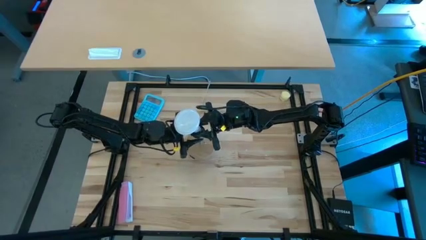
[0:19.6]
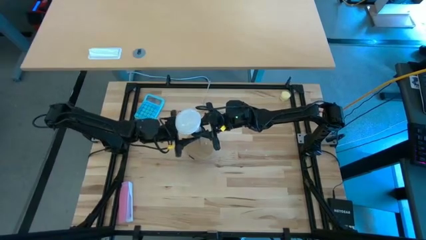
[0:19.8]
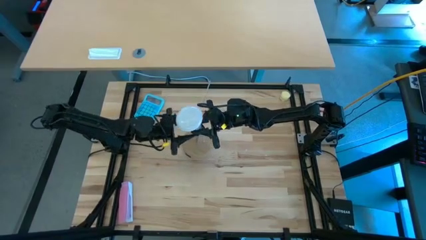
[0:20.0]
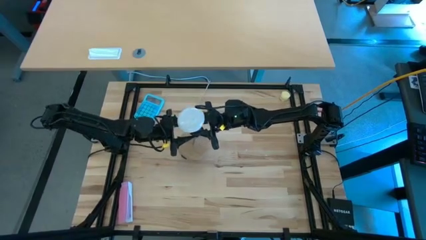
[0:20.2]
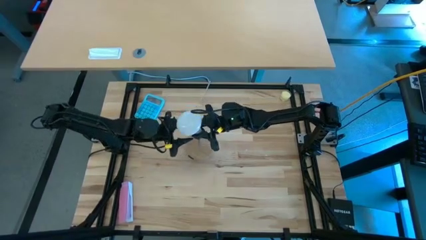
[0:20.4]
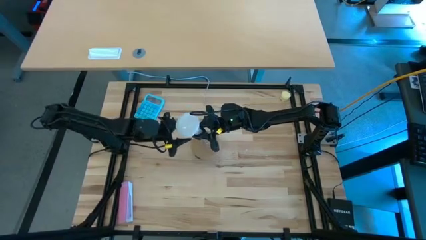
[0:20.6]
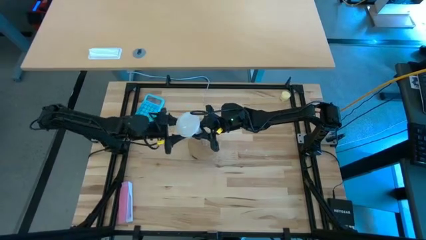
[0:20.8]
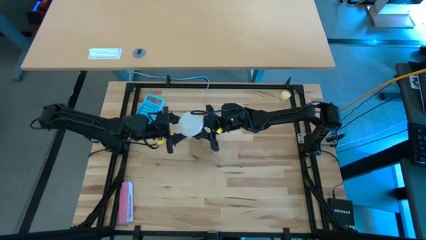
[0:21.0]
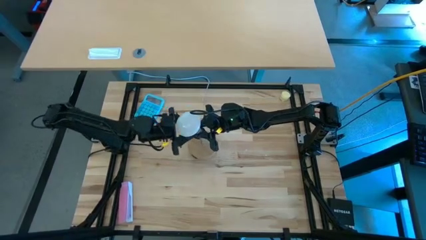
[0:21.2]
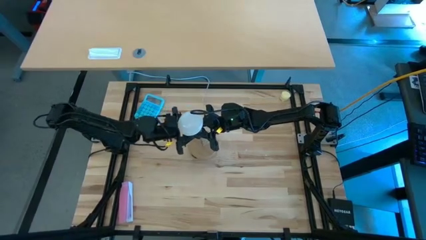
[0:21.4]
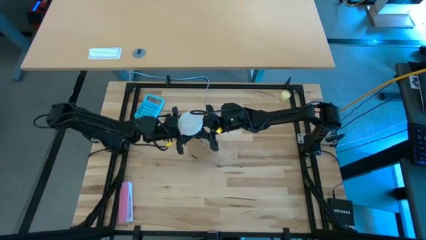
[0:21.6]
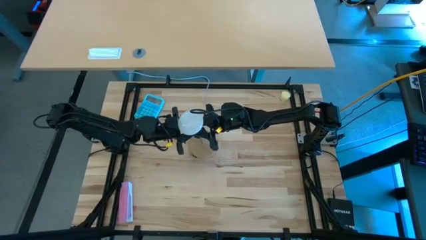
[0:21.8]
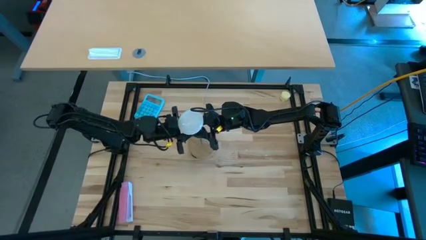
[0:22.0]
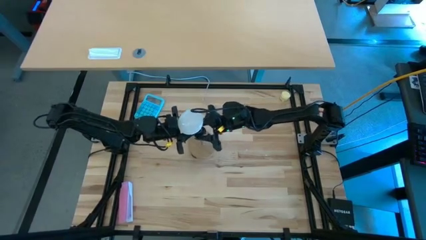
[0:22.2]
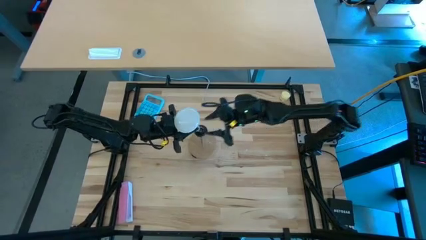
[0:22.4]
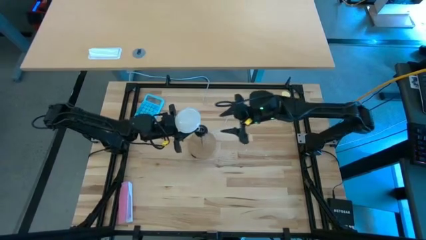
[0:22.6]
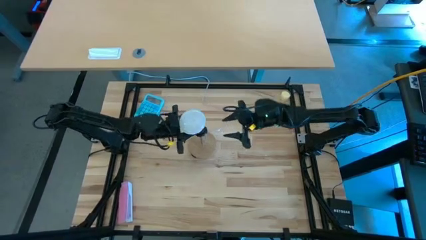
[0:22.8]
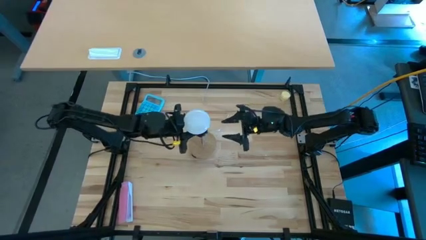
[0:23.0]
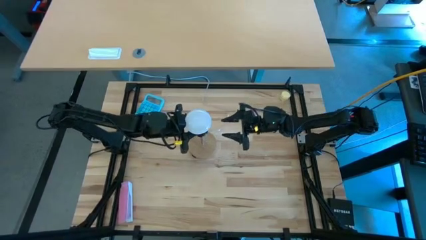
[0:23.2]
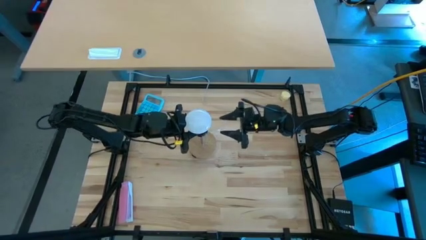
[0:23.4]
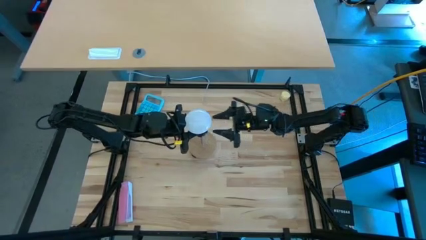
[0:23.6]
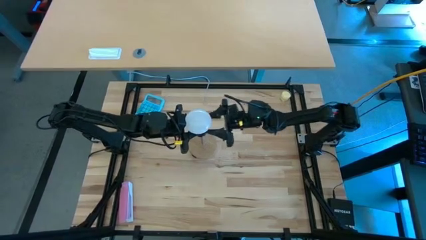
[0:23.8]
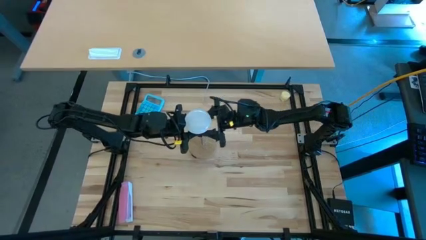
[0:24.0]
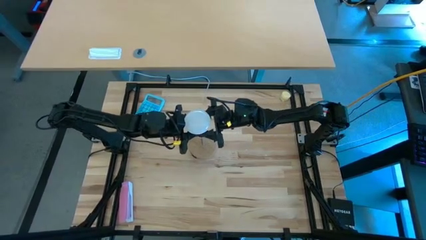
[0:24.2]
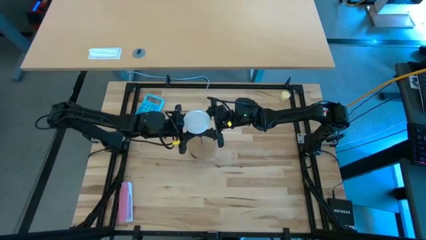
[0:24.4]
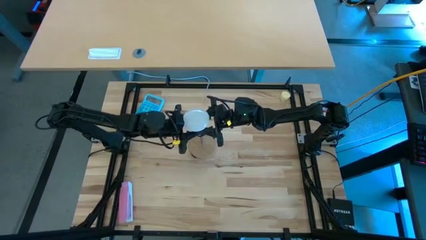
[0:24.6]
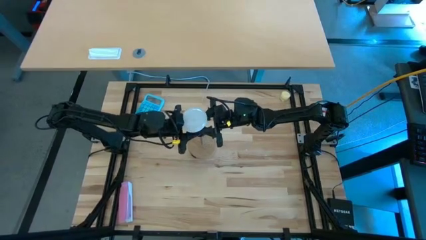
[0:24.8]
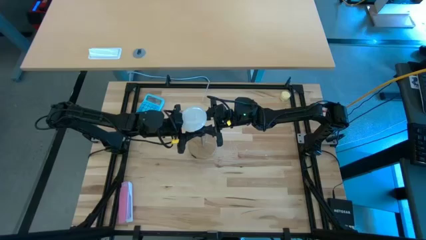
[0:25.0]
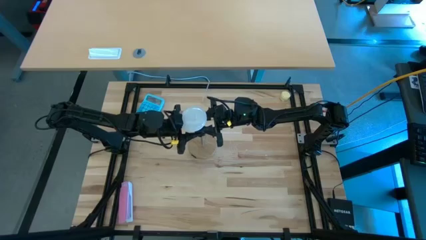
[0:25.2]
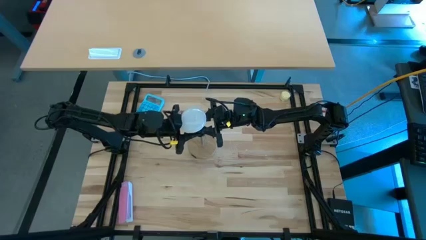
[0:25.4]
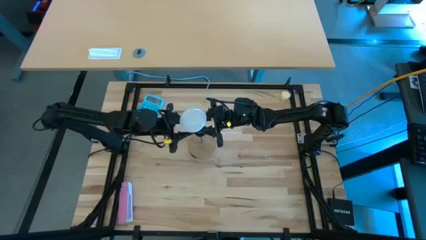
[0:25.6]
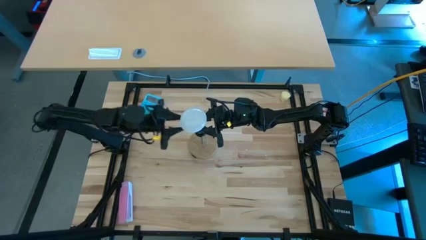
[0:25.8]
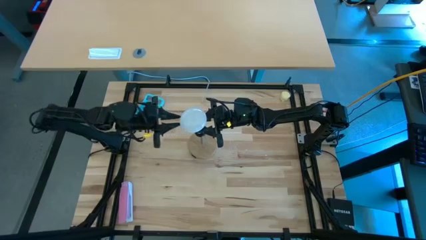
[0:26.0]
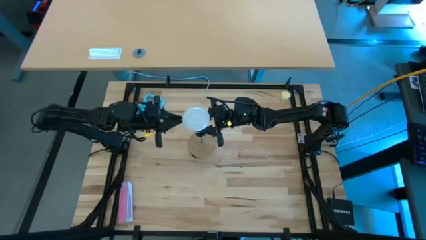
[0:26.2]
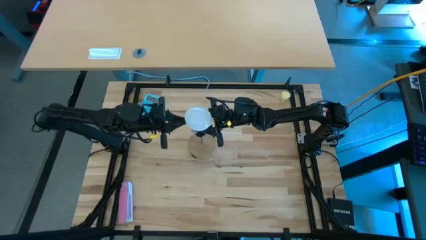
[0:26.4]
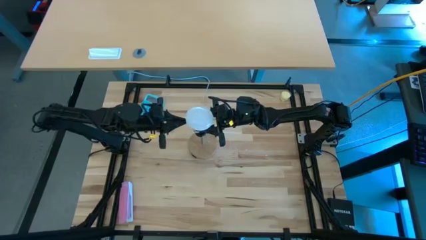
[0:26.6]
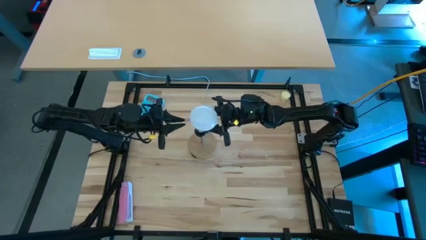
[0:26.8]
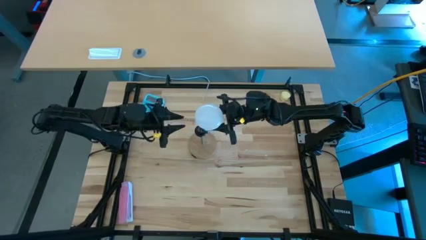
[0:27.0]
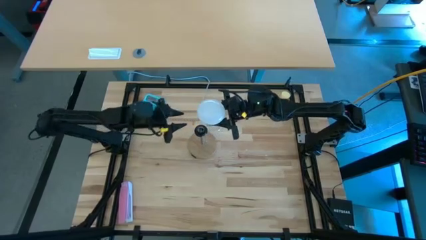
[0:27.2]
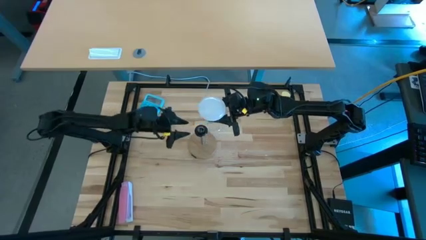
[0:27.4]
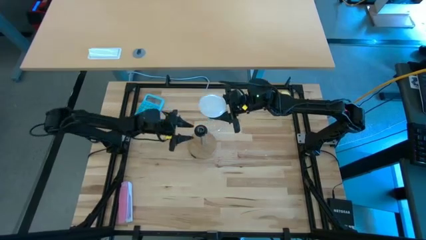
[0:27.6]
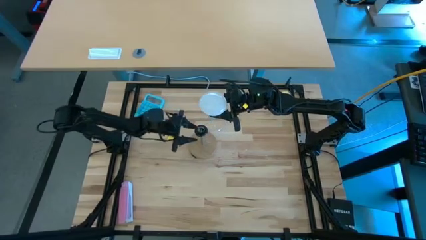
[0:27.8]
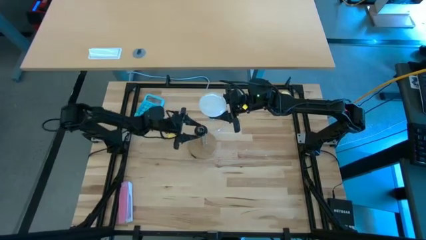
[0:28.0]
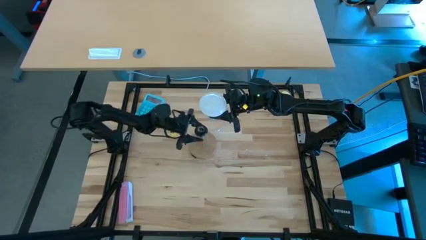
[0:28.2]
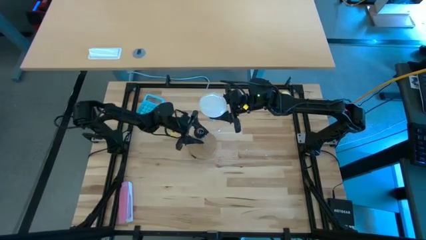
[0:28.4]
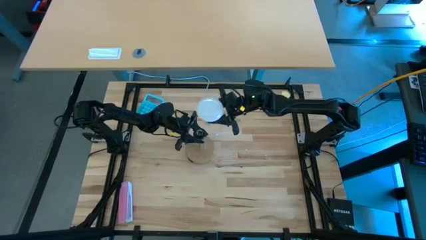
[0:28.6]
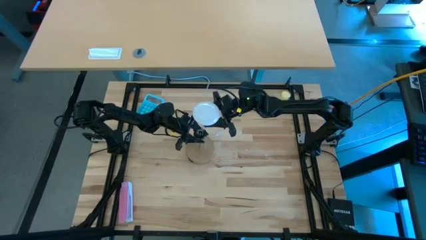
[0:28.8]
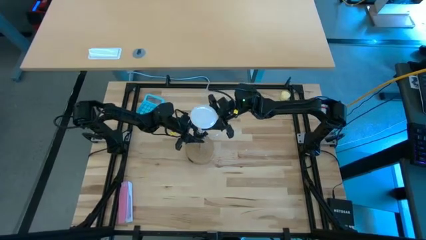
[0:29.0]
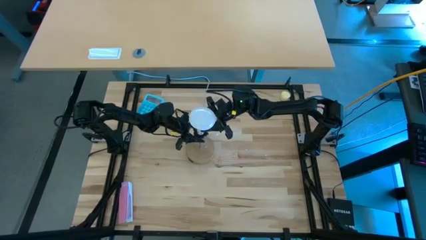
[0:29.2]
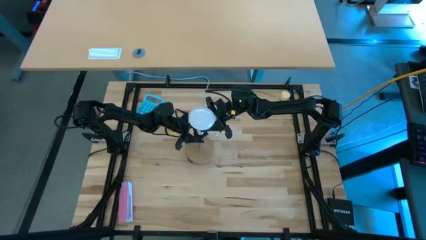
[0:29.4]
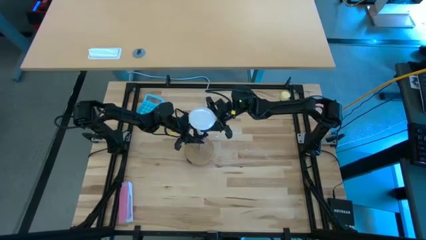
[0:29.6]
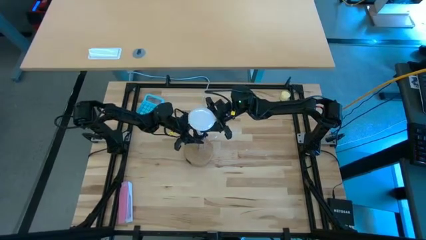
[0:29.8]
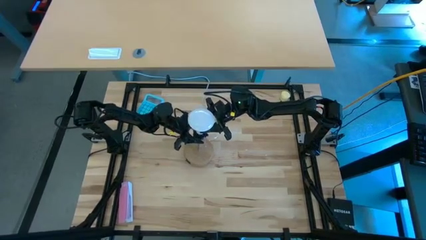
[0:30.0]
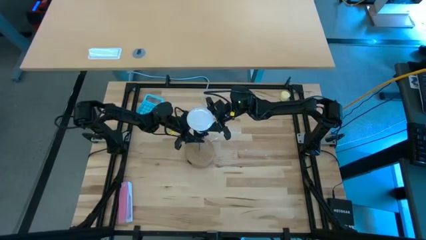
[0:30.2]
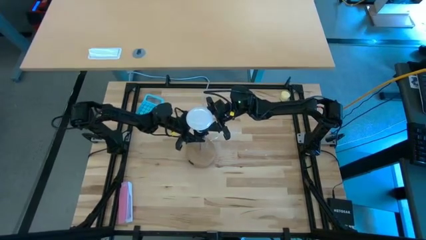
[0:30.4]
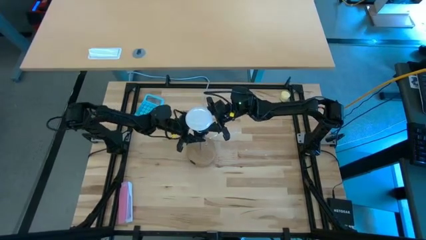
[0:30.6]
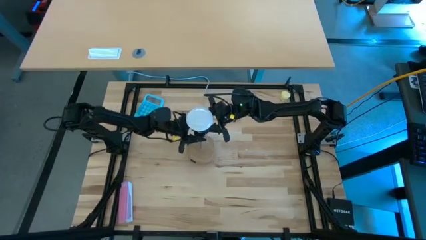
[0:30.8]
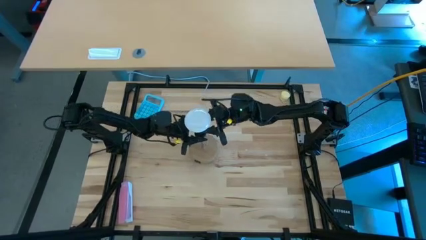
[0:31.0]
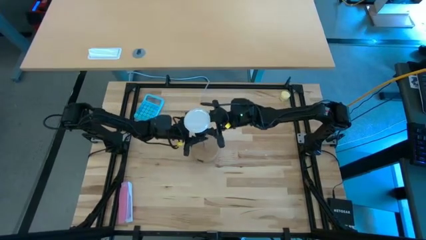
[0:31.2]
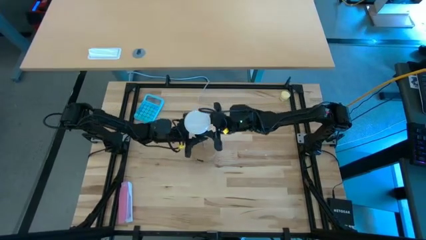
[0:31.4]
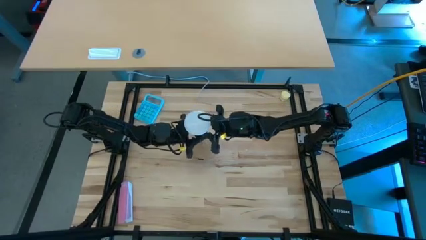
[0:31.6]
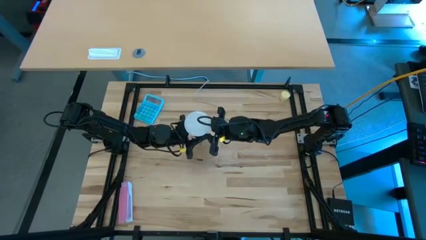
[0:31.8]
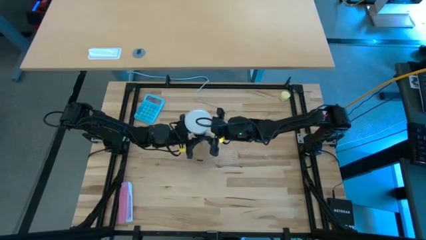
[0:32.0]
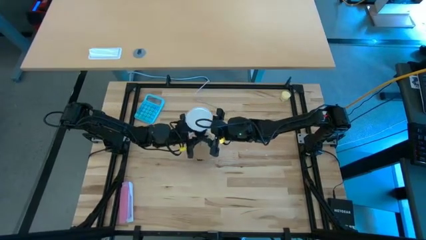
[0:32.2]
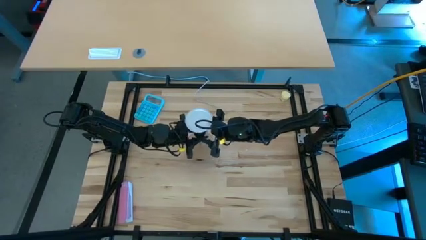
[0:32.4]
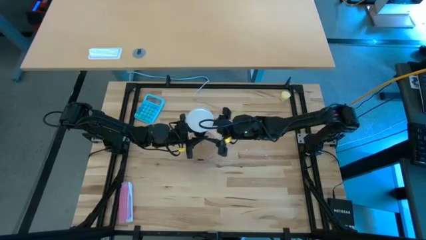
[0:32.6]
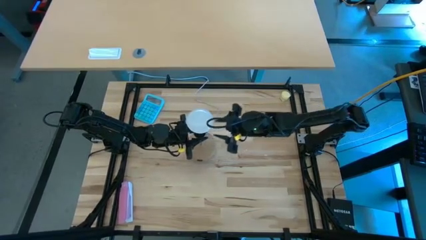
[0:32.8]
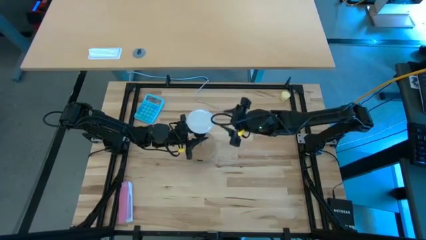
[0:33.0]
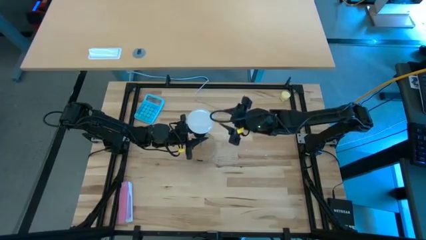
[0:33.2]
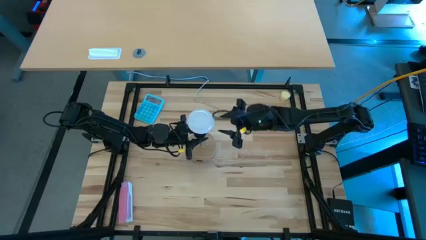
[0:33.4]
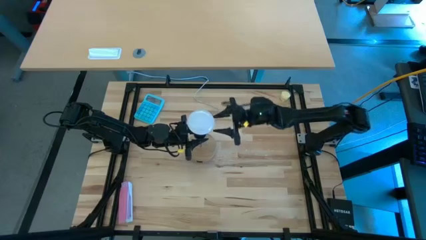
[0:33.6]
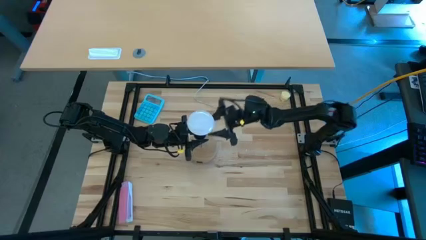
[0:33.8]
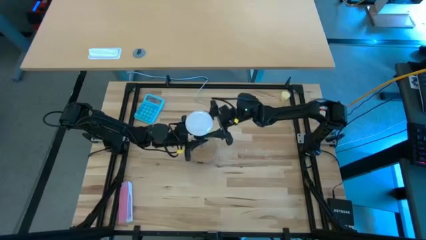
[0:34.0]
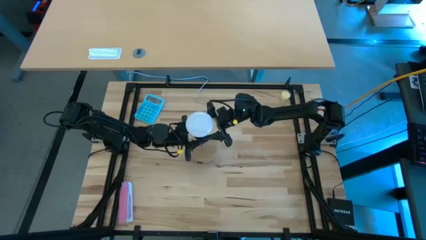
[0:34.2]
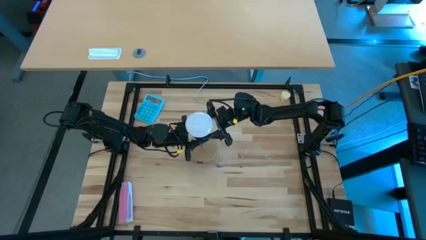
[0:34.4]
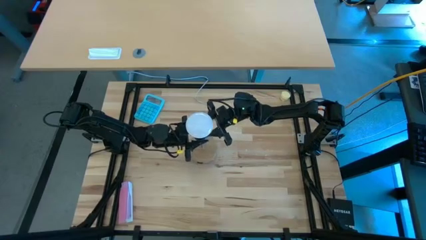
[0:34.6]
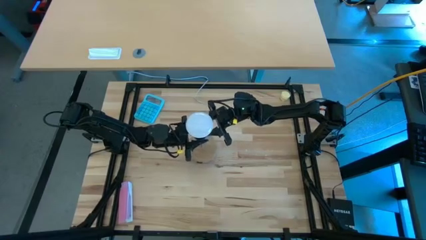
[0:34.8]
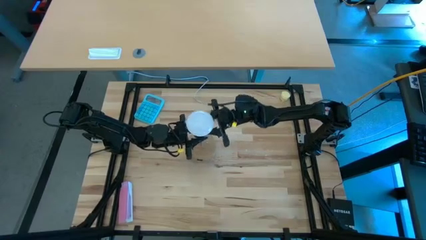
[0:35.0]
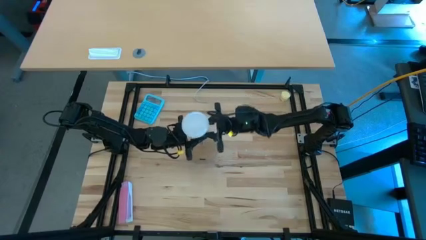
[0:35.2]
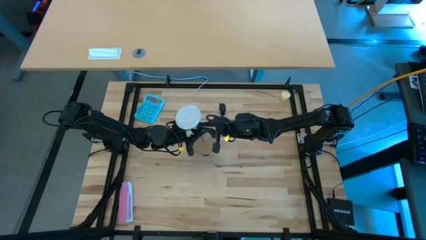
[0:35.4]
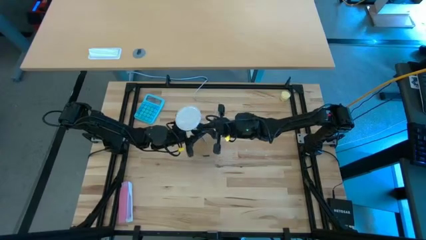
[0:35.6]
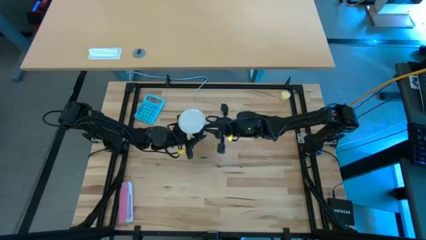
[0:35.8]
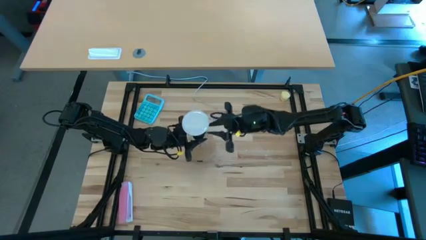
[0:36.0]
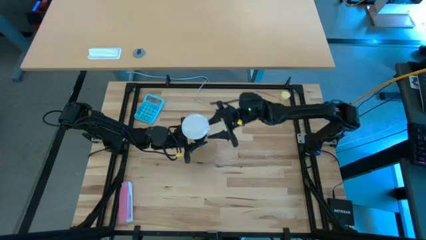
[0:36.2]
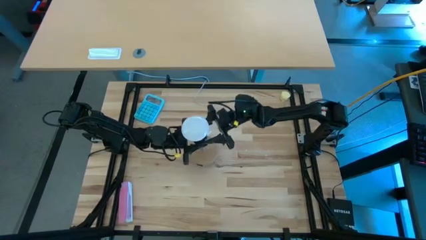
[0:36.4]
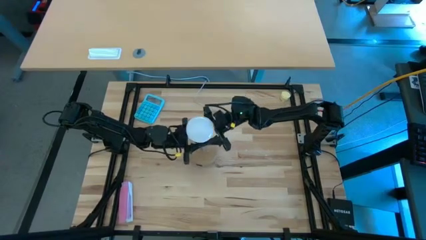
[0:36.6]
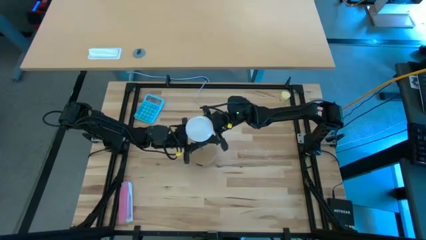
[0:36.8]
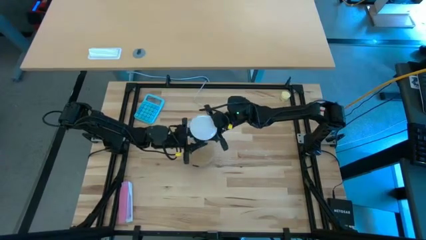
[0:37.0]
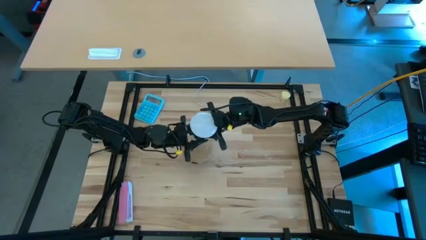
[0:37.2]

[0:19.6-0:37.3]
Task: Screw lightbulb
Insert the light bulb into the lamp
